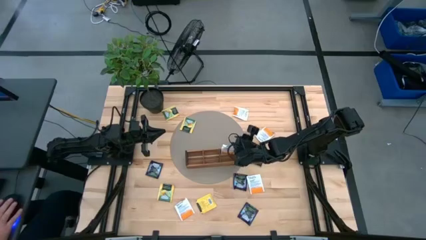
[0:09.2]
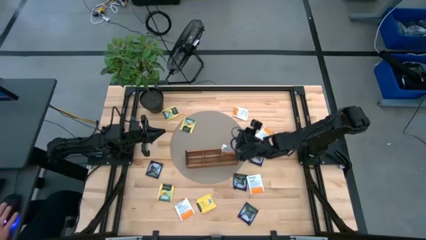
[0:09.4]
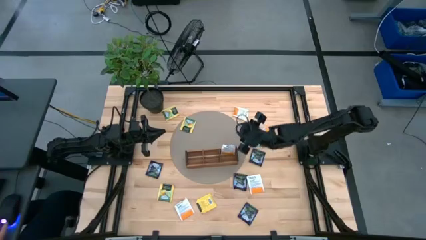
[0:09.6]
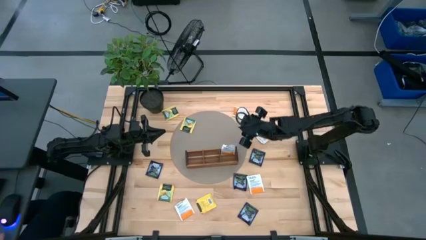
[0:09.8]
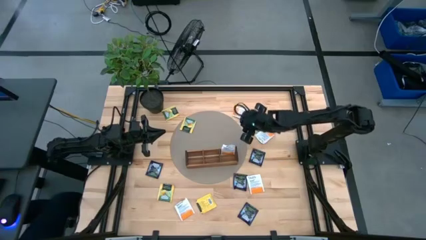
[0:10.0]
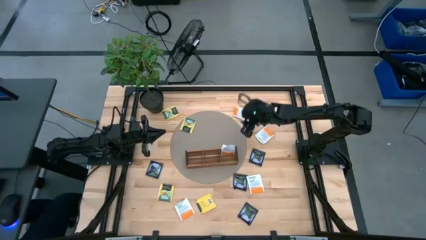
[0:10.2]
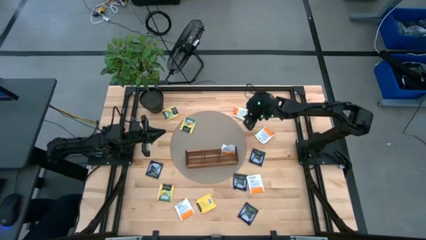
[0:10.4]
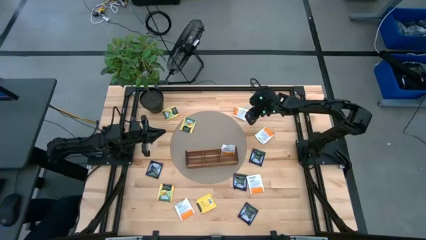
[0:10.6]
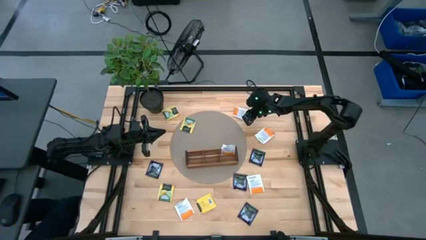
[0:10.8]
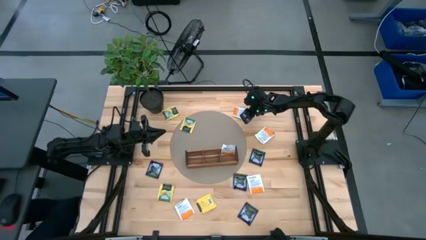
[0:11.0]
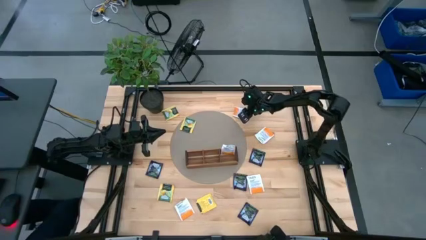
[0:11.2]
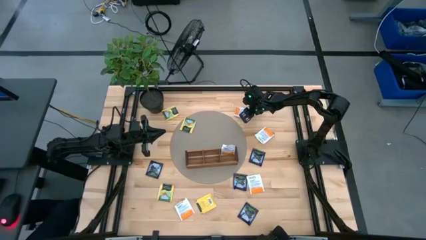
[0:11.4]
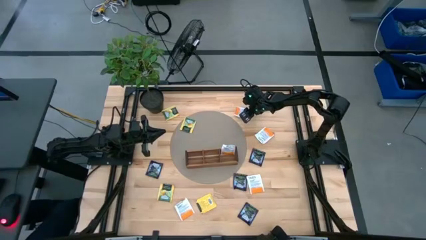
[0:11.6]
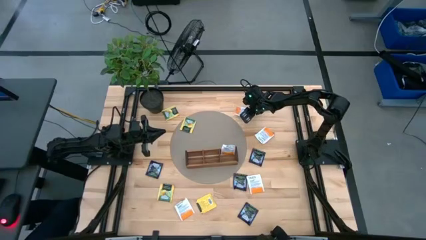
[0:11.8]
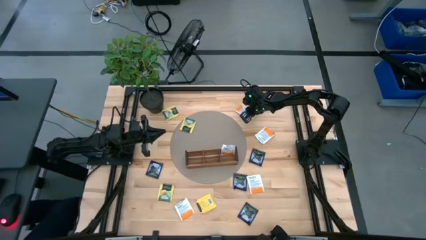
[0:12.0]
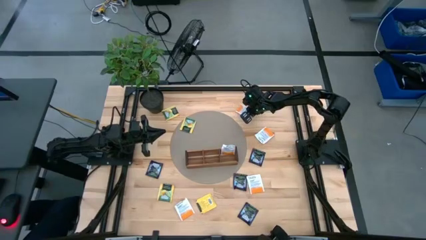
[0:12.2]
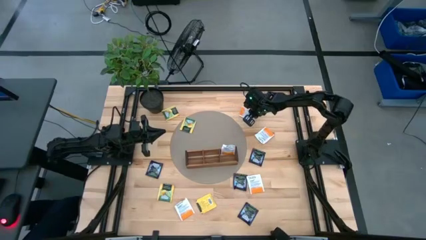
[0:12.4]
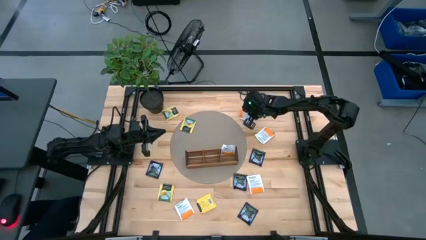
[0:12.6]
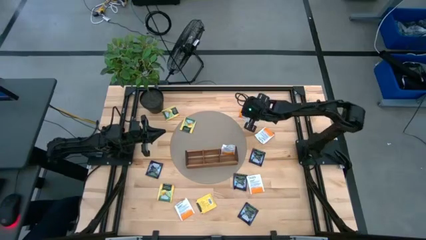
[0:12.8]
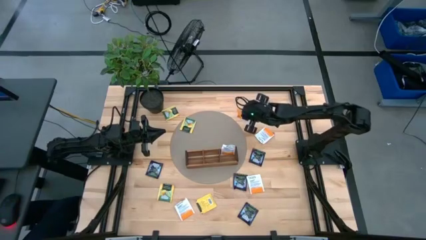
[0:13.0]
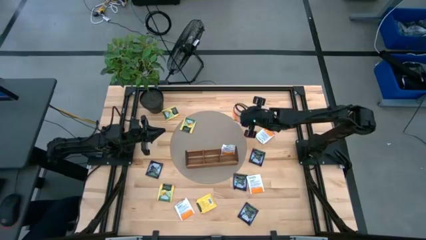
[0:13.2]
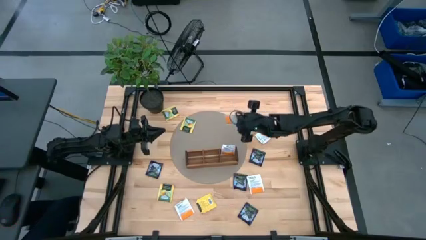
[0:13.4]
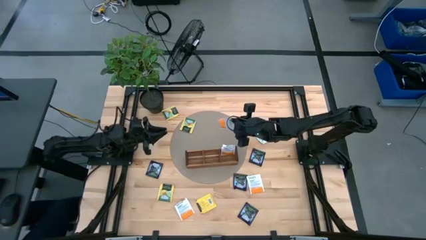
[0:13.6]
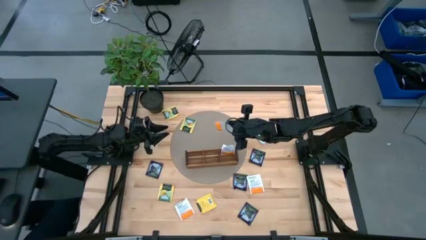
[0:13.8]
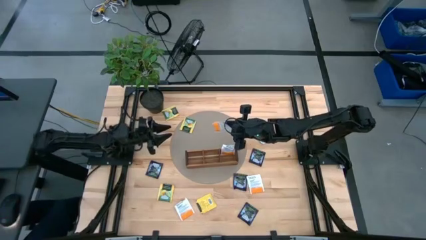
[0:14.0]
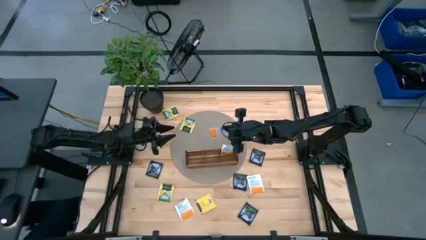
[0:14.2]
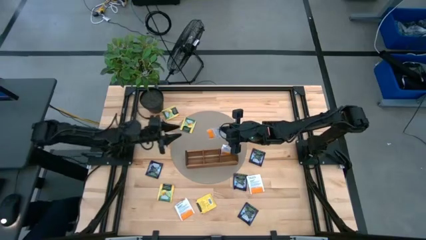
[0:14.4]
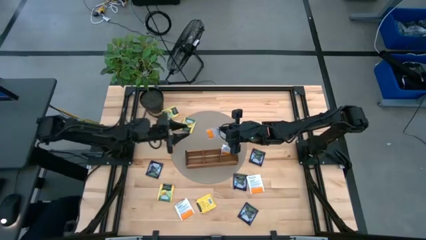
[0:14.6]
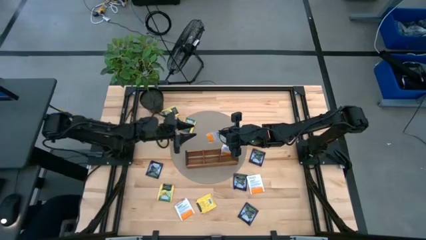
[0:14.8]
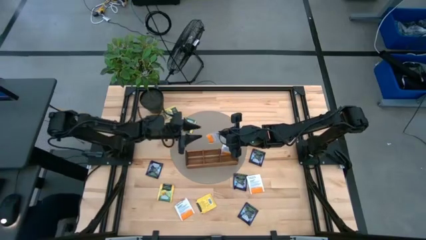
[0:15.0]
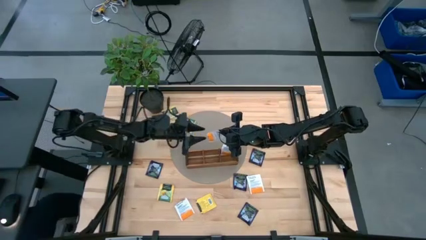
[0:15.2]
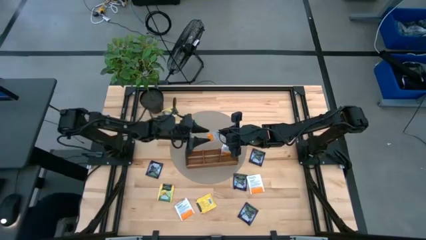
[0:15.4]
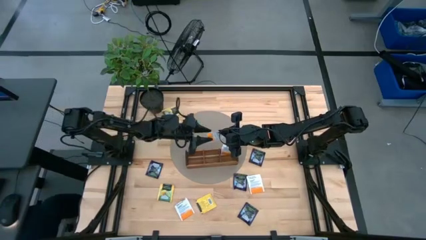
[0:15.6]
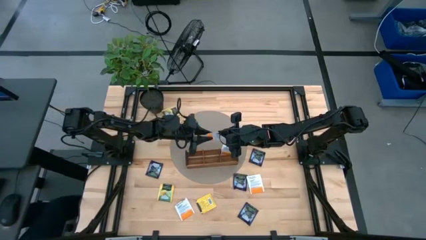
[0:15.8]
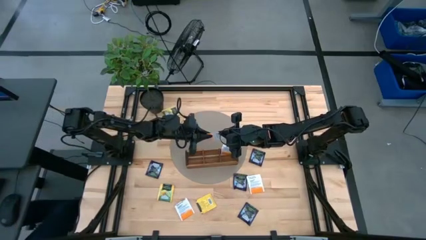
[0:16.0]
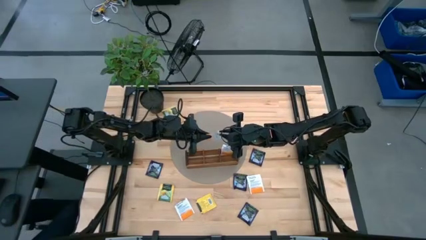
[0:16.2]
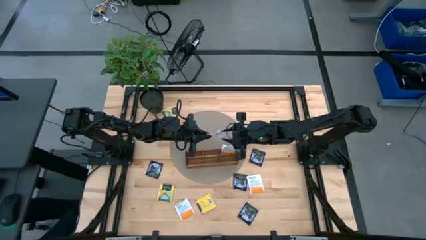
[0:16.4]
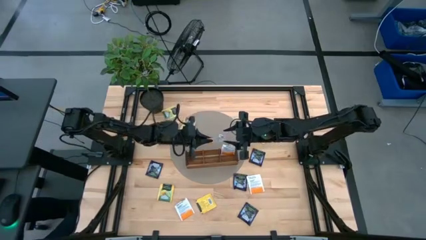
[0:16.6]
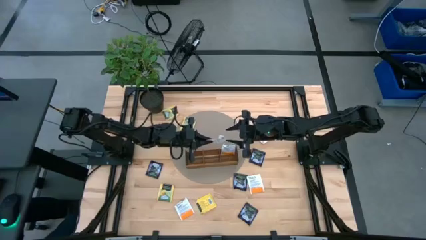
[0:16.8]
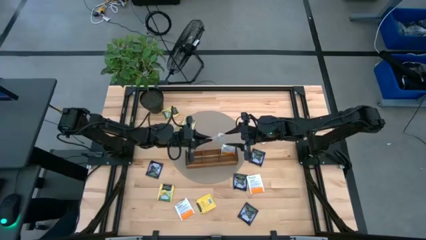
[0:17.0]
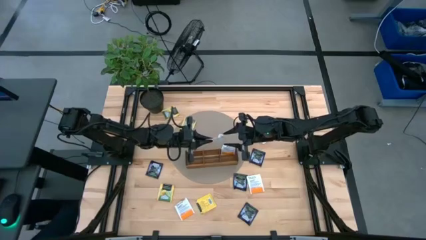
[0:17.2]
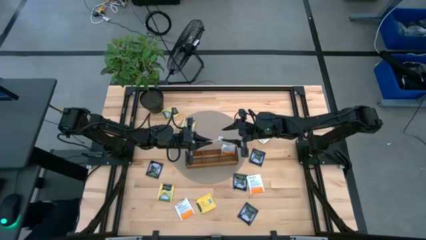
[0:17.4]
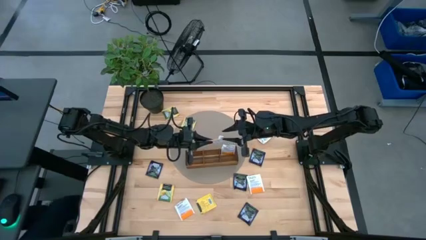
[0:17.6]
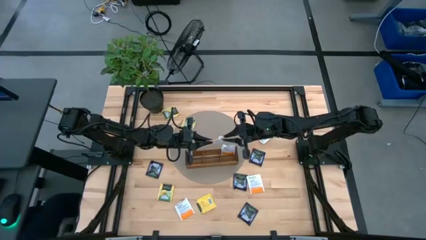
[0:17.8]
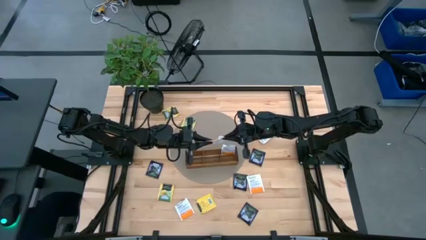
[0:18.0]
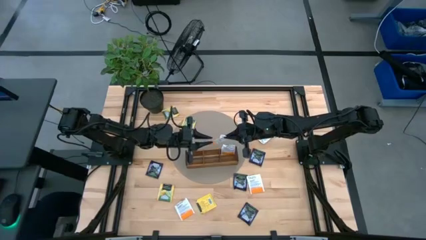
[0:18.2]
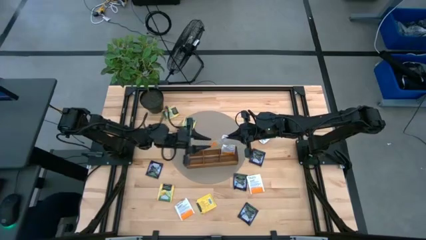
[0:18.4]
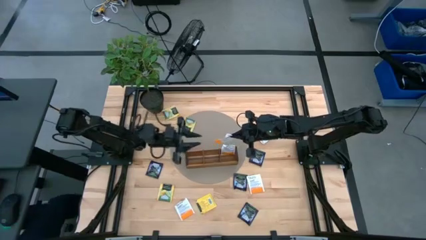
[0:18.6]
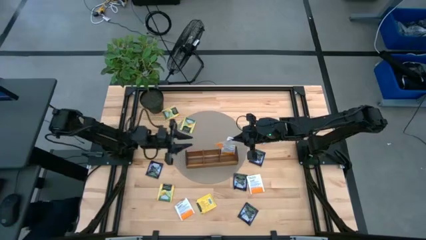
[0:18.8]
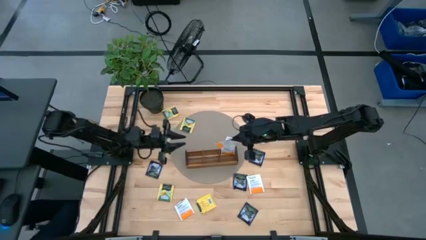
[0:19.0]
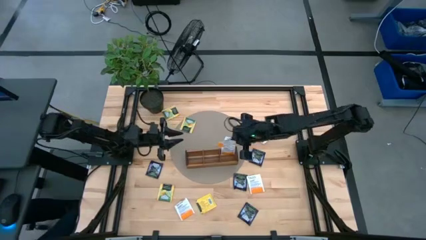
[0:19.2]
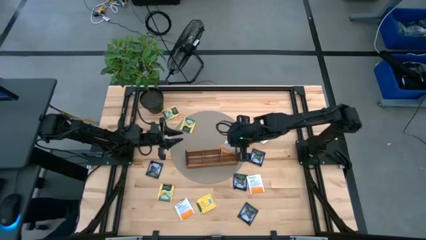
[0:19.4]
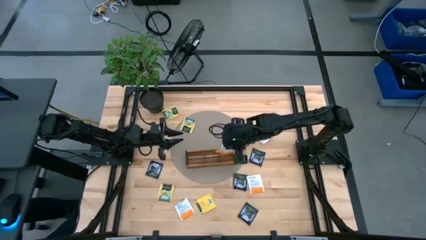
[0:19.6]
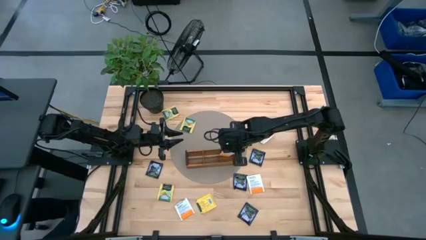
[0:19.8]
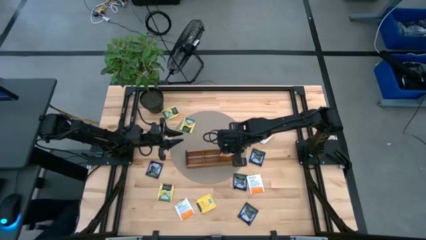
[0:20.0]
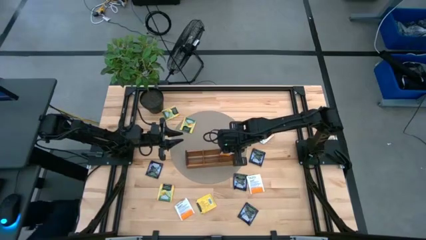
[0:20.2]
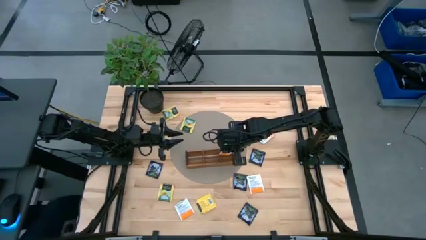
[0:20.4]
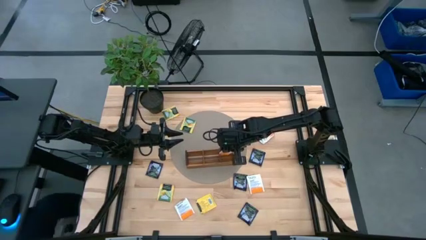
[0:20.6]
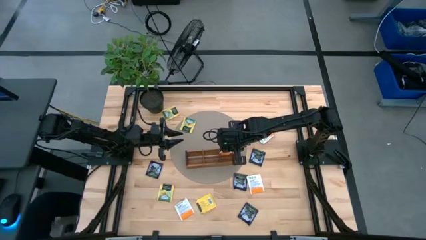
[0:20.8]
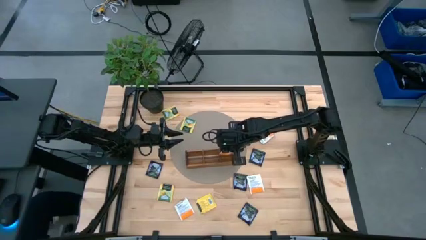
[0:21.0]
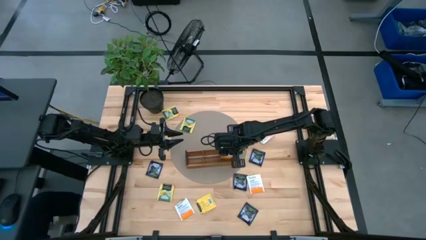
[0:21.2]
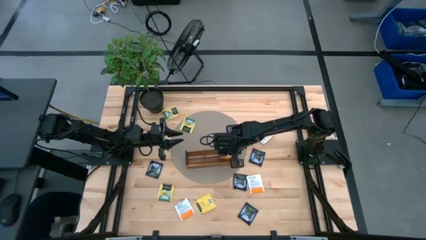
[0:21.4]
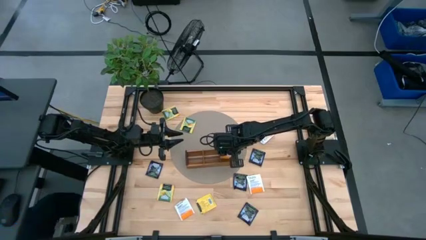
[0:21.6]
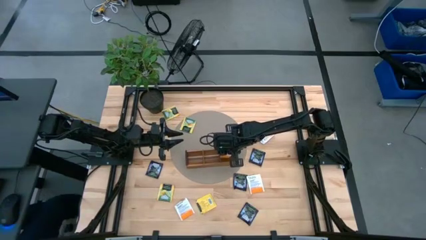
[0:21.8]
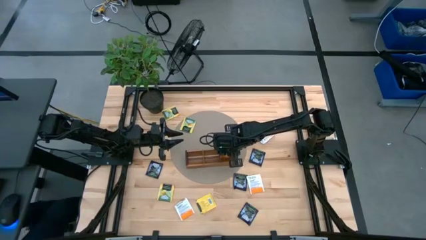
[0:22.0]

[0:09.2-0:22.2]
Task: Pick & Place Tea
Put the white tea bag into the right section of the wooden organizer
